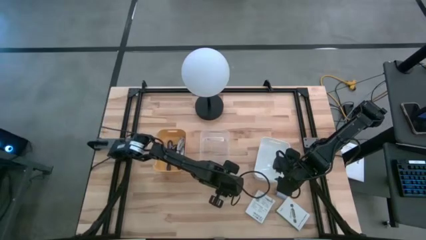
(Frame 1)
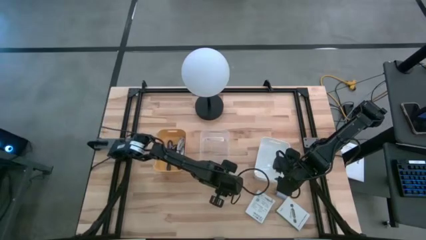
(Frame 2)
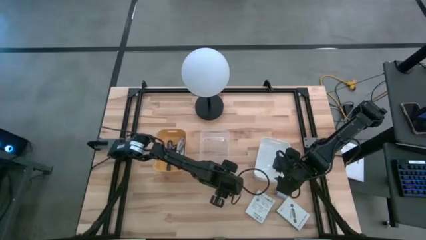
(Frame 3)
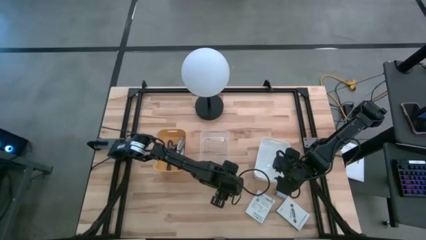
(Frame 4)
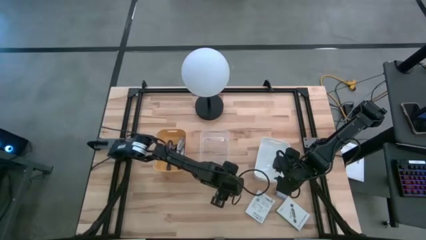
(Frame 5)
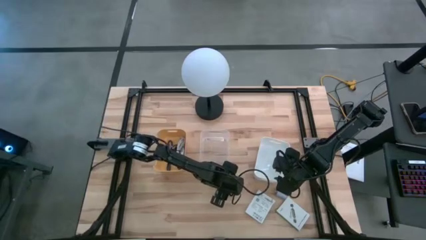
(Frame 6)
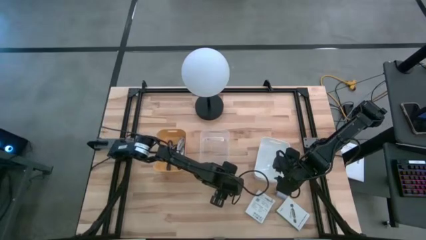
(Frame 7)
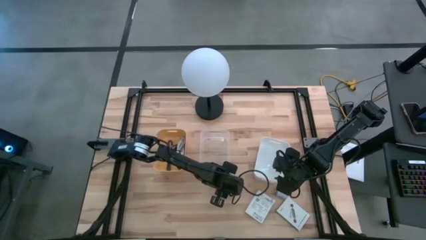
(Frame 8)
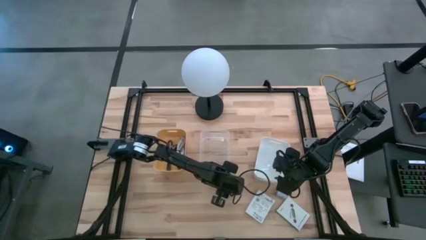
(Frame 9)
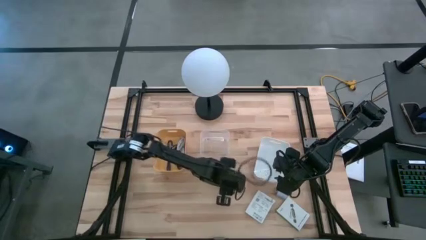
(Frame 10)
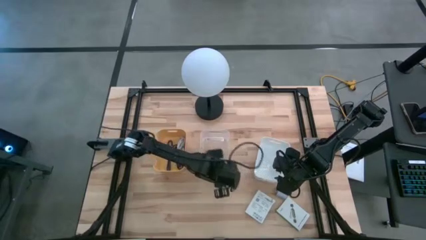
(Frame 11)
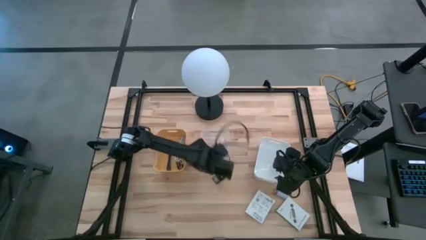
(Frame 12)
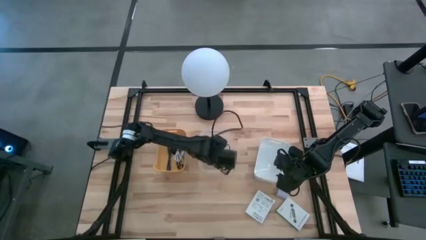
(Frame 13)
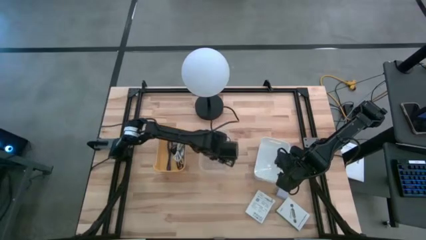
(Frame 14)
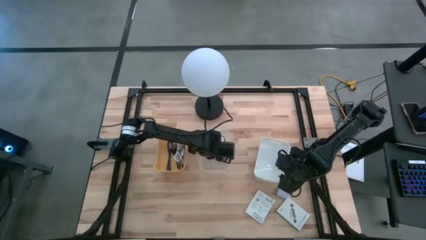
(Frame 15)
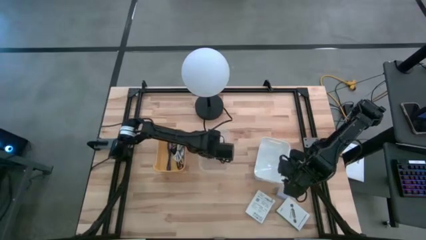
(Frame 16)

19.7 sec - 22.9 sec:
Task: Pick and place items into bin
Put the green charger adapter into the transparent bin

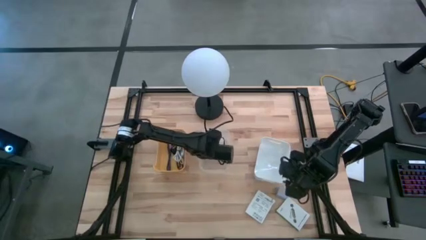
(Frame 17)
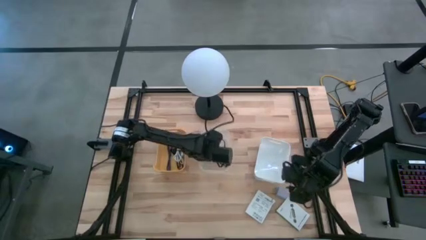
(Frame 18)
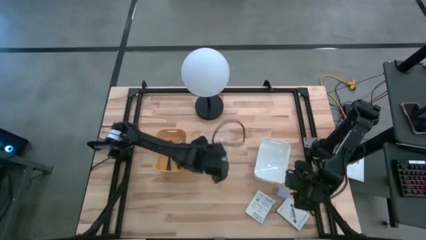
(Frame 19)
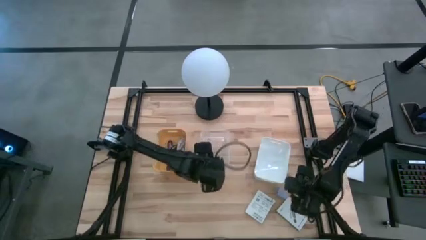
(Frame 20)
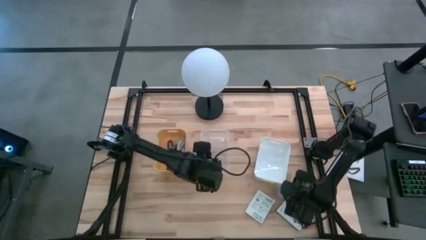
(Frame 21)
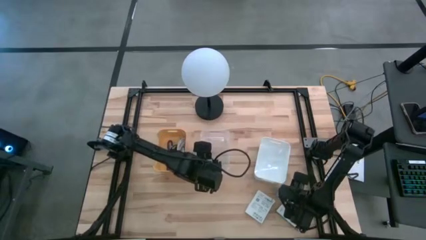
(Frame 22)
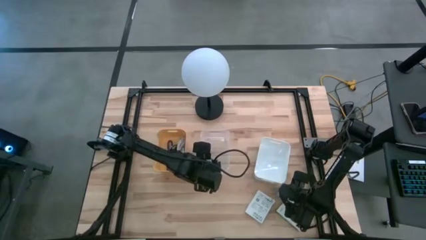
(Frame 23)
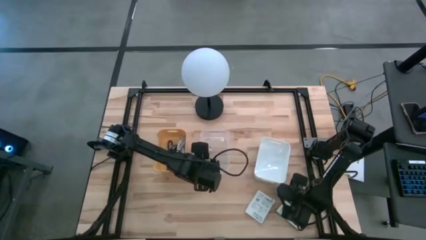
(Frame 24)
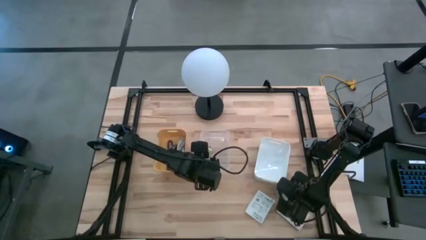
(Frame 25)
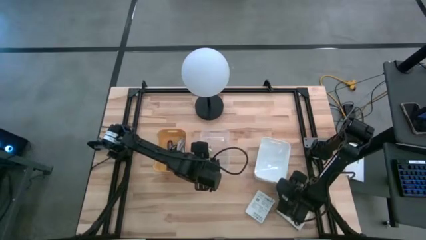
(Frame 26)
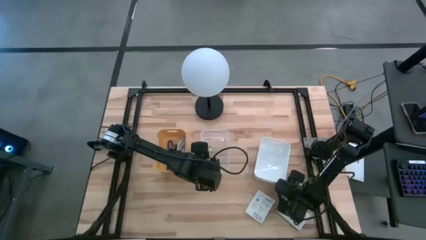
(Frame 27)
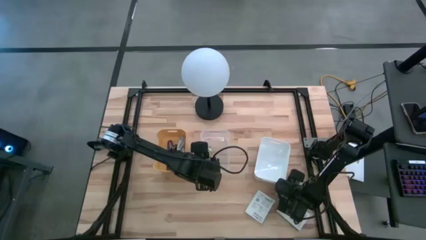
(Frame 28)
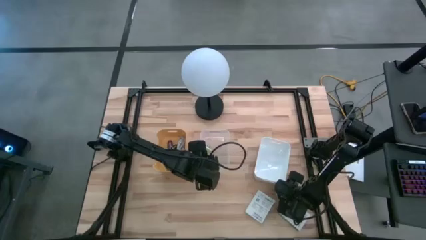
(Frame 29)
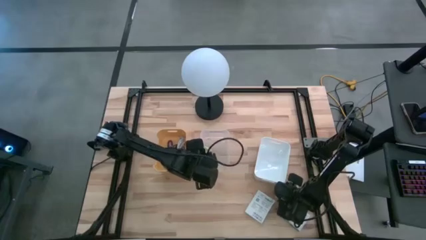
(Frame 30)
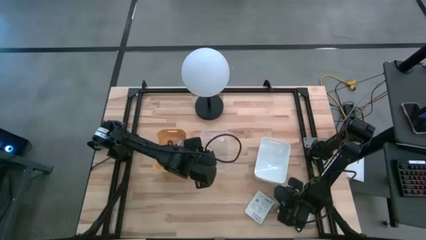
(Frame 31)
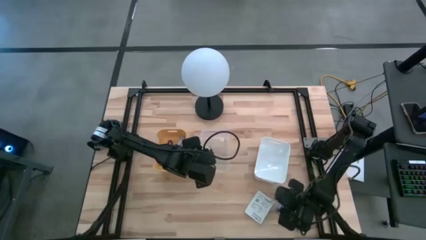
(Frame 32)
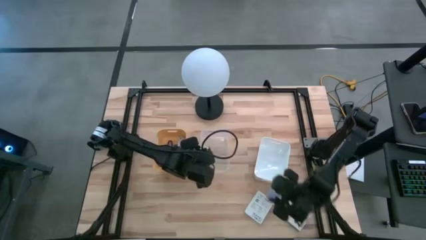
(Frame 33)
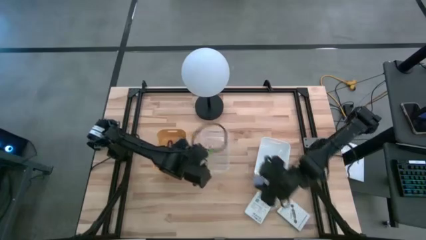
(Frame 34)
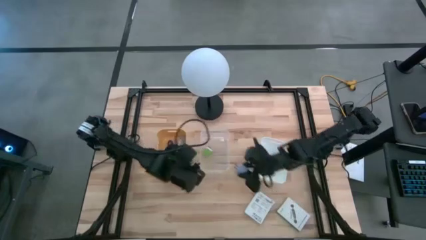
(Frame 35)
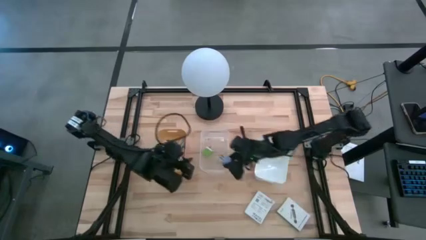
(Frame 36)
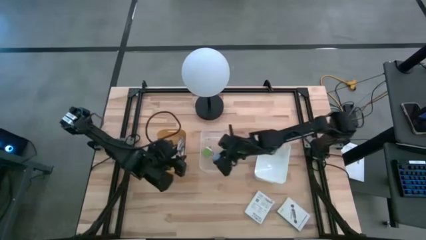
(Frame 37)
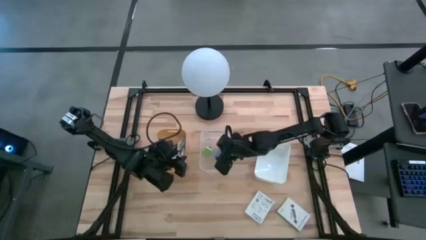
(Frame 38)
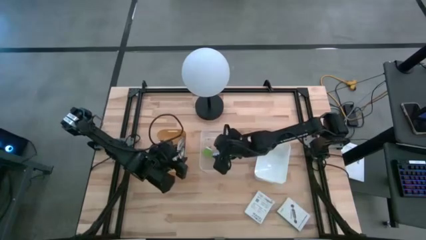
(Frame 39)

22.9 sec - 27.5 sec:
Put the purple charger adapter into the transparent bin

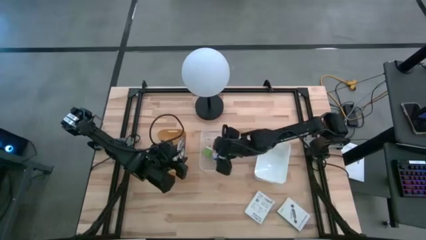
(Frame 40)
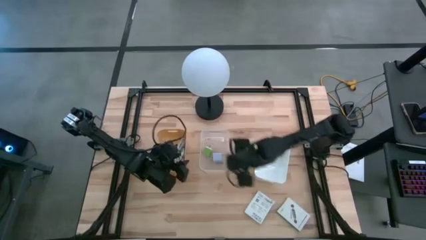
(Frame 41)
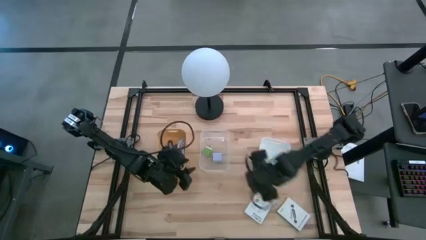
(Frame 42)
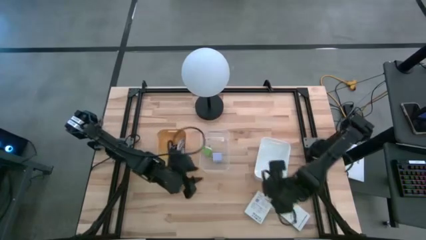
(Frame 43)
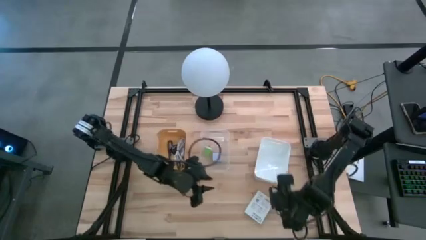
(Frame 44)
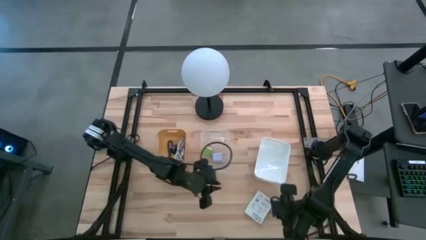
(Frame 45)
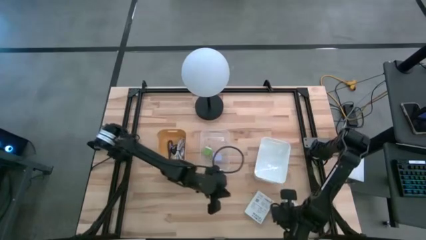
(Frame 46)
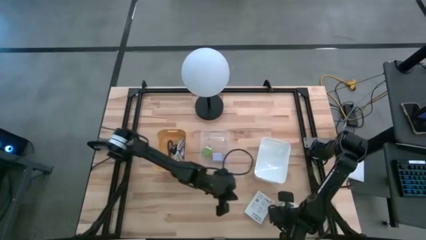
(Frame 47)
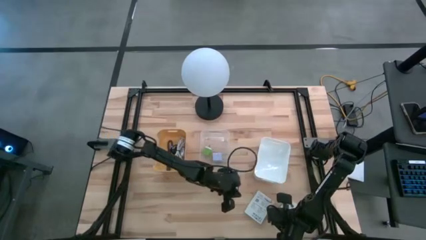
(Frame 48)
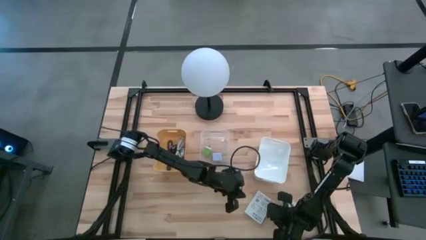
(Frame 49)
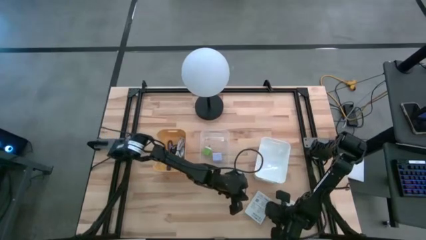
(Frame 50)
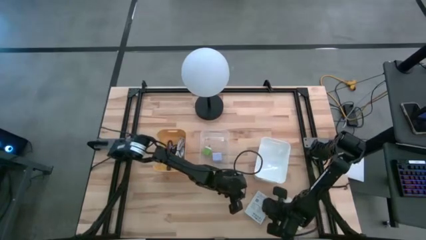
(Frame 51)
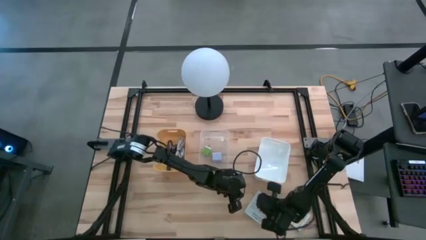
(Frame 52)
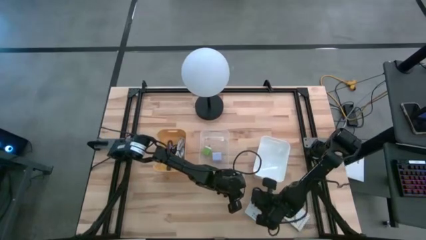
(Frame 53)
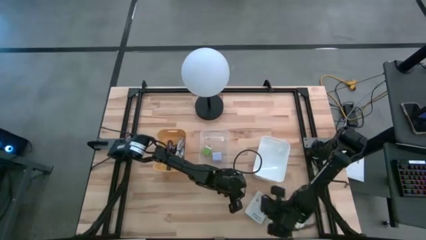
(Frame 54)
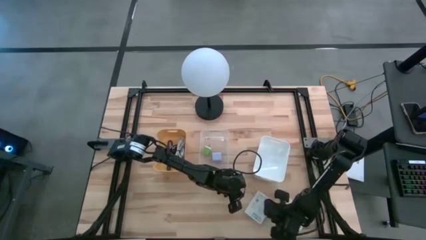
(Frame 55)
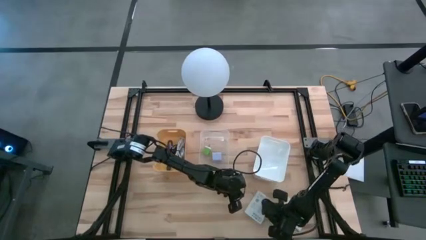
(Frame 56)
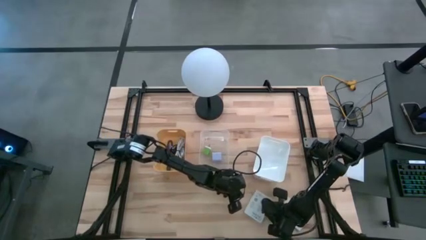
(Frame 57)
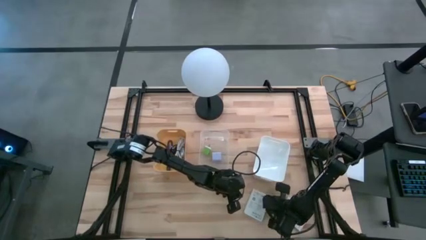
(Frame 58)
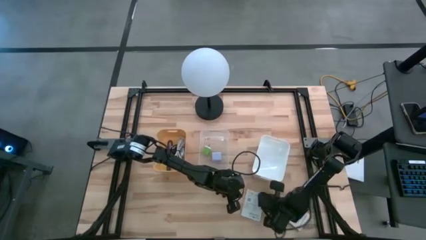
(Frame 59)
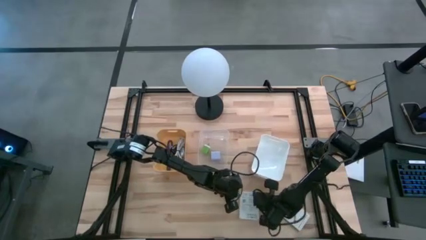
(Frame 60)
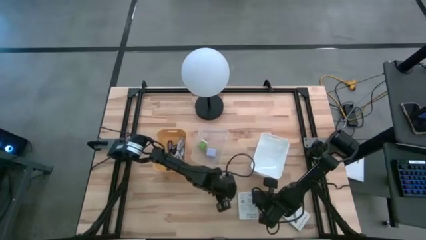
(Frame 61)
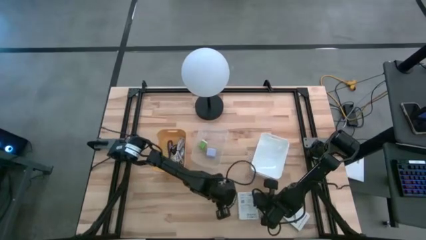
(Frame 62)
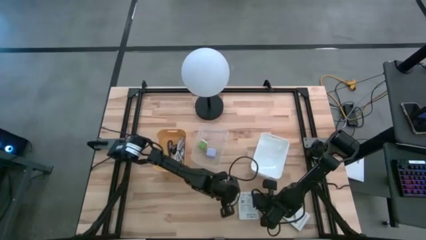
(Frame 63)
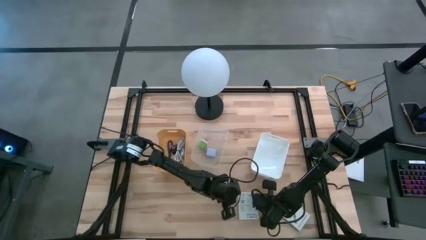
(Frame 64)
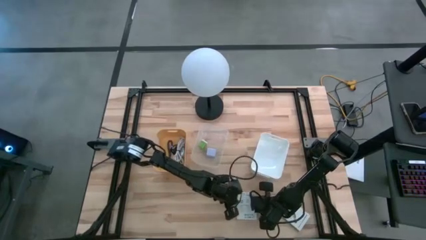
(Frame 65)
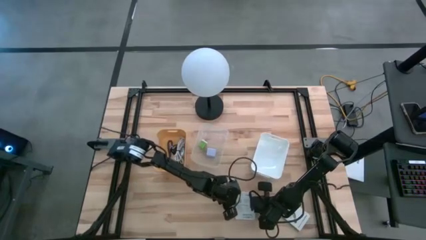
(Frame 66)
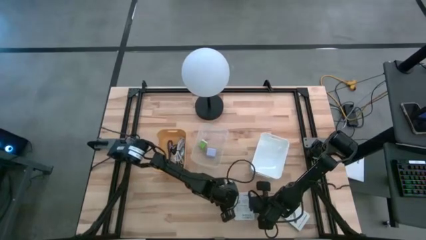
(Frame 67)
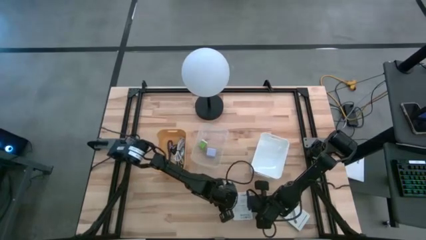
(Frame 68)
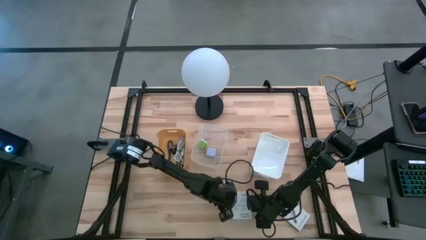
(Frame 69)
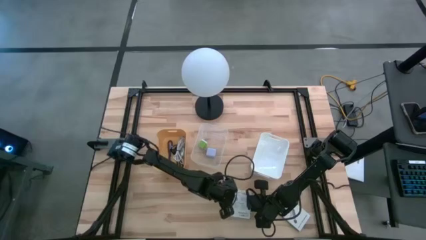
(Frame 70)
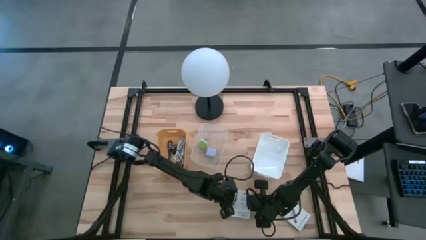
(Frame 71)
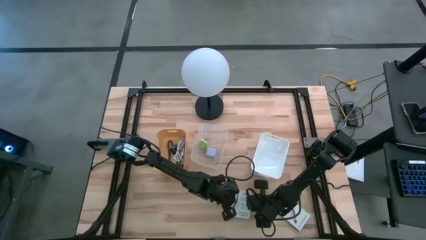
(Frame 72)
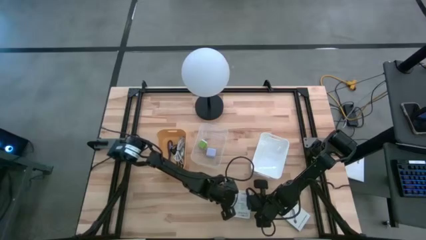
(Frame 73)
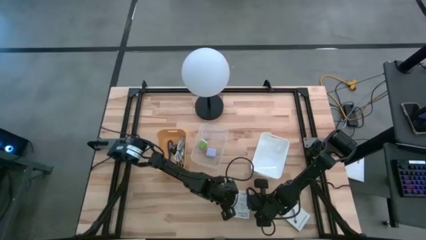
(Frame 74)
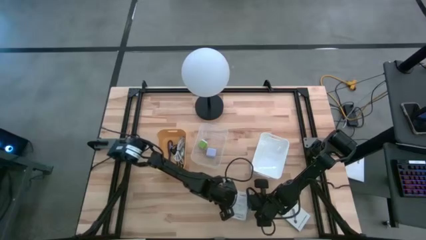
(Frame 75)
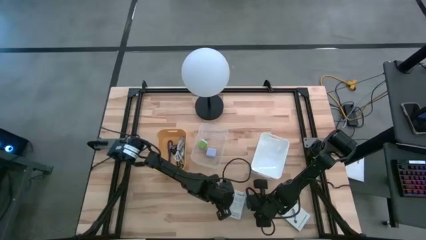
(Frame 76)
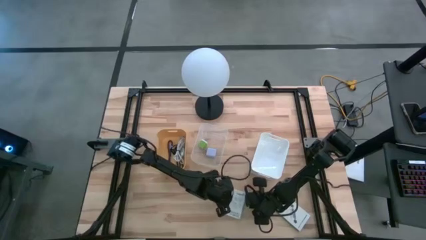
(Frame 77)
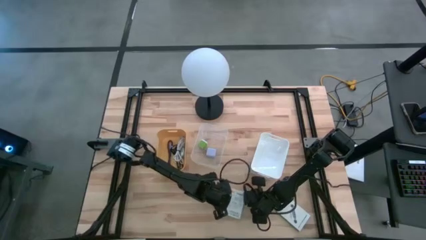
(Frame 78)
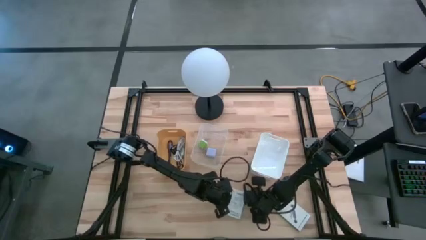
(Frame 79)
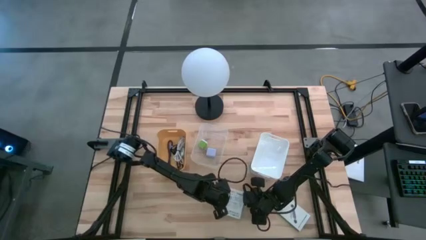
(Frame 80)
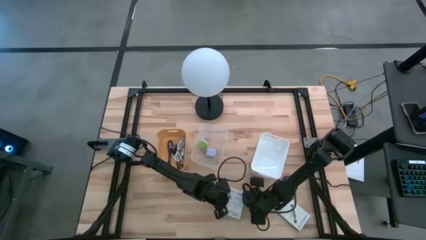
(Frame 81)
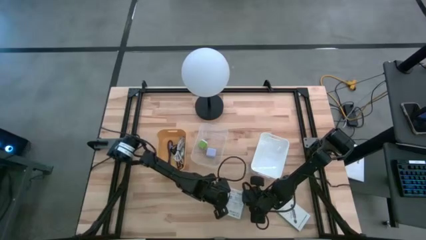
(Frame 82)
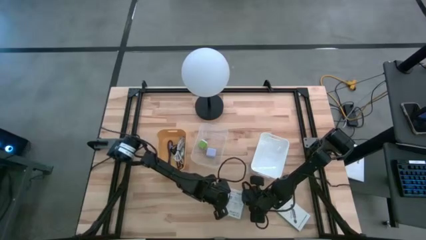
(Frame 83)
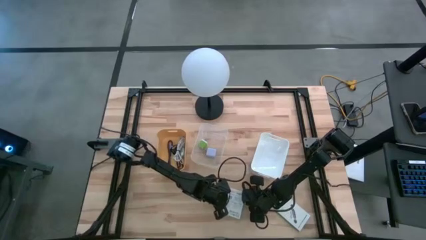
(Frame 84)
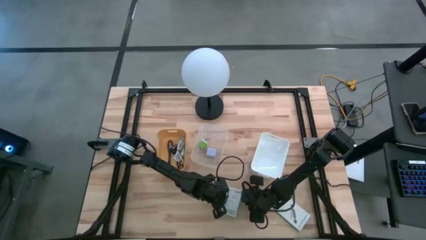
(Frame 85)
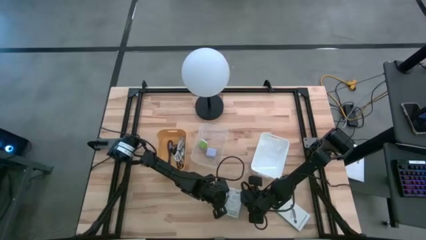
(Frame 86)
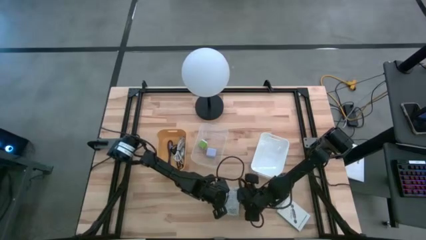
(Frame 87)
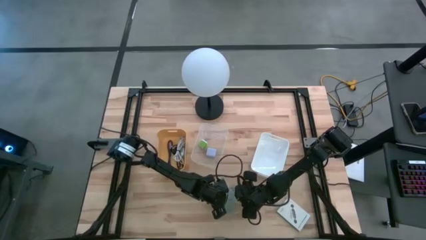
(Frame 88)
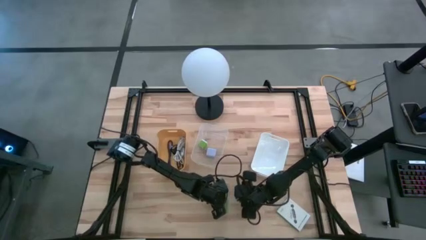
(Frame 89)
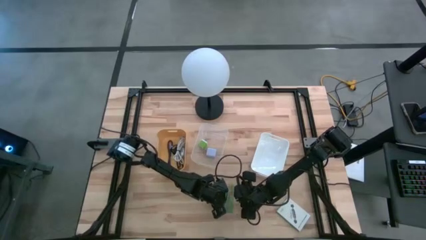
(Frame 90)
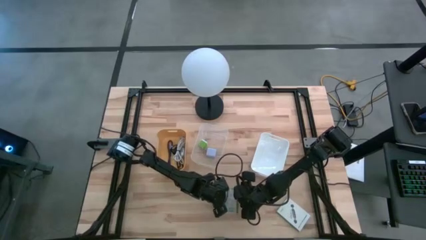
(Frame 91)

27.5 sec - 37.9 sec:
Put the left card reader box into the white bin
